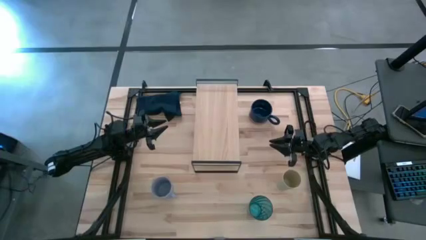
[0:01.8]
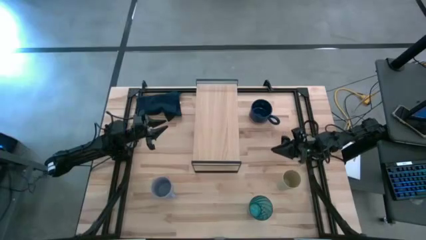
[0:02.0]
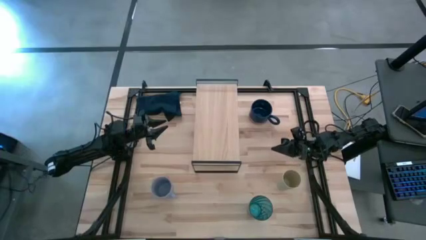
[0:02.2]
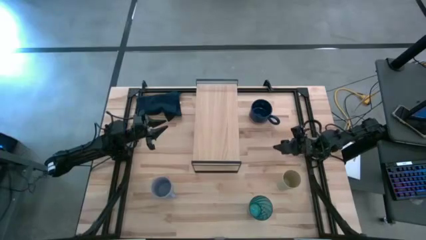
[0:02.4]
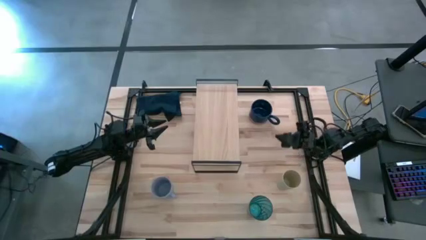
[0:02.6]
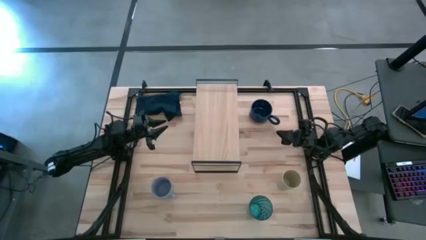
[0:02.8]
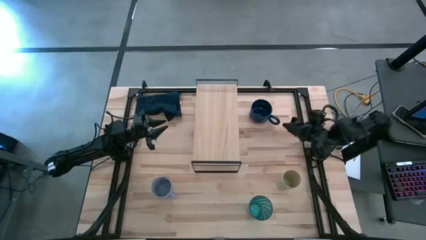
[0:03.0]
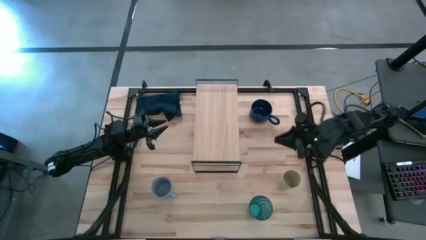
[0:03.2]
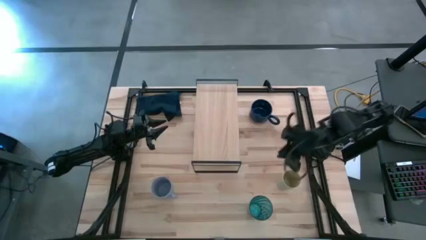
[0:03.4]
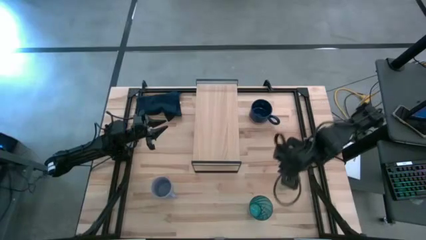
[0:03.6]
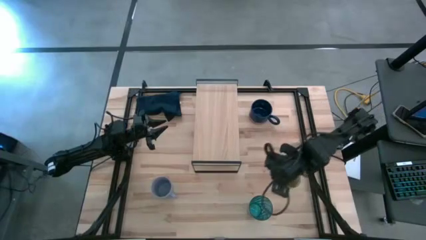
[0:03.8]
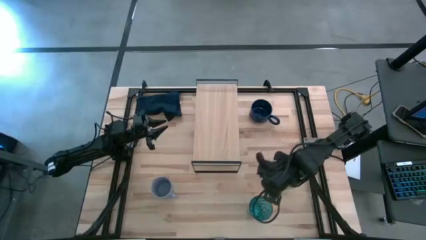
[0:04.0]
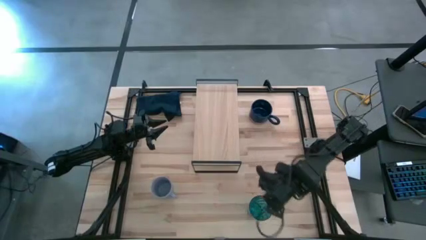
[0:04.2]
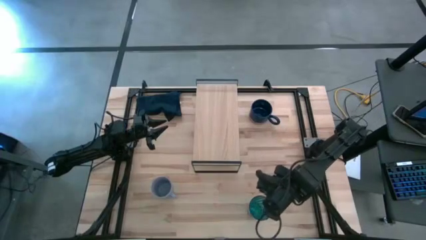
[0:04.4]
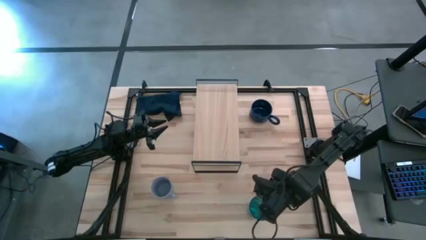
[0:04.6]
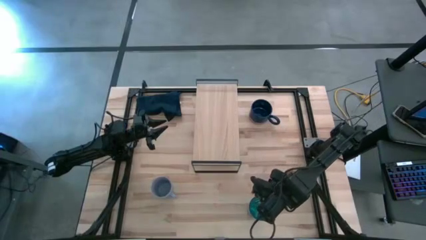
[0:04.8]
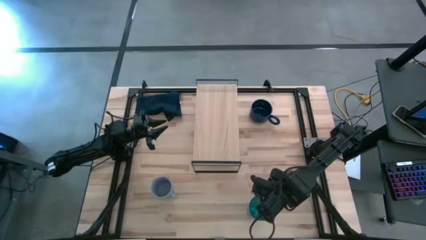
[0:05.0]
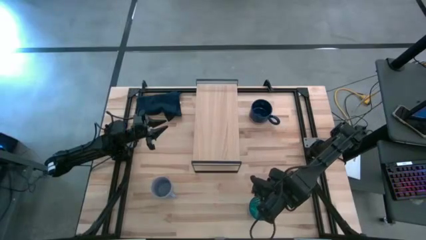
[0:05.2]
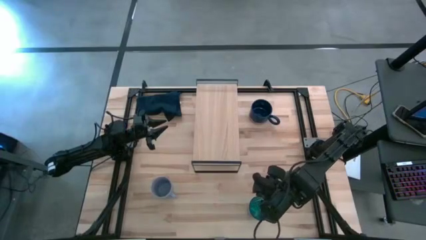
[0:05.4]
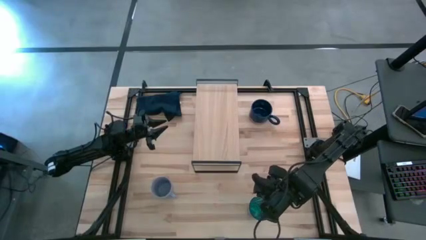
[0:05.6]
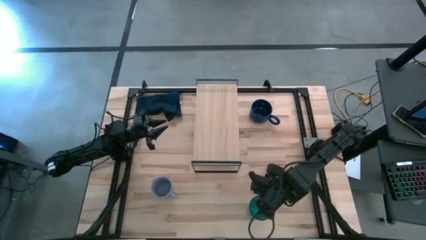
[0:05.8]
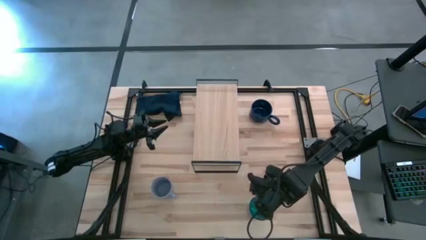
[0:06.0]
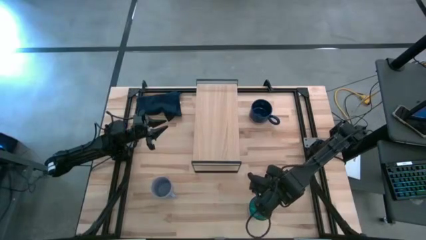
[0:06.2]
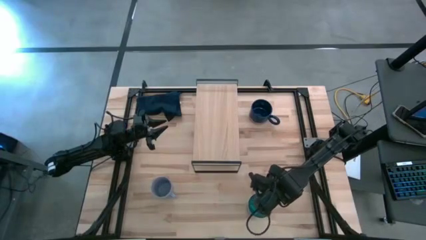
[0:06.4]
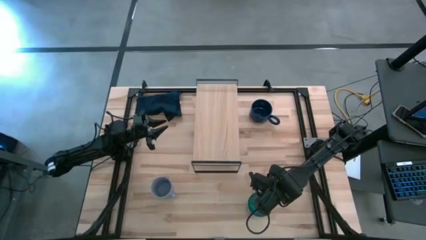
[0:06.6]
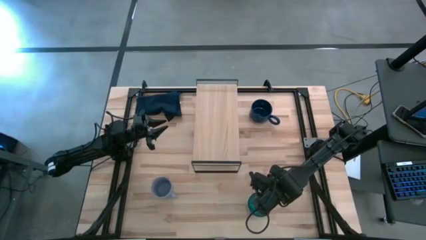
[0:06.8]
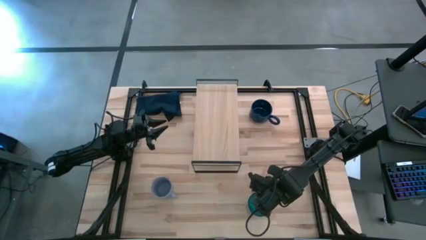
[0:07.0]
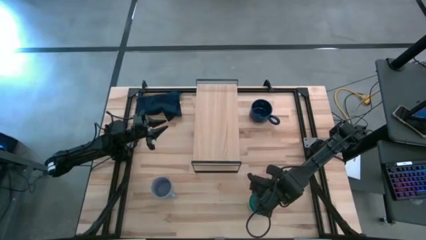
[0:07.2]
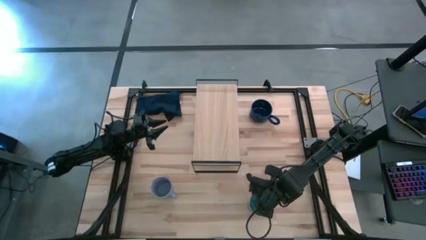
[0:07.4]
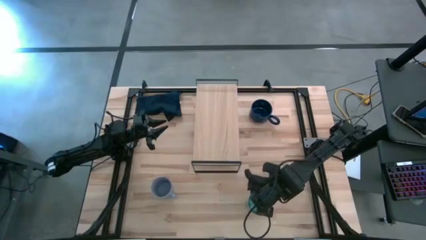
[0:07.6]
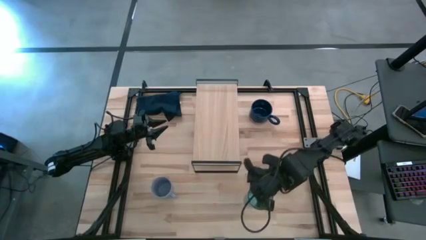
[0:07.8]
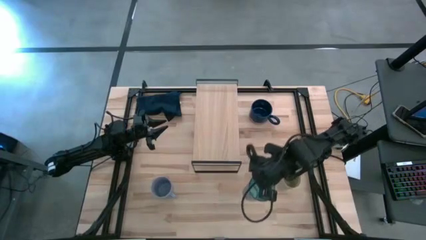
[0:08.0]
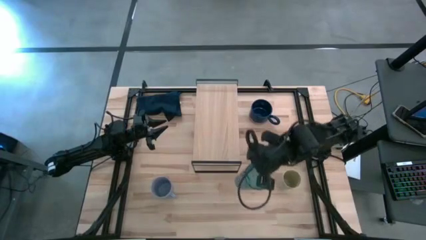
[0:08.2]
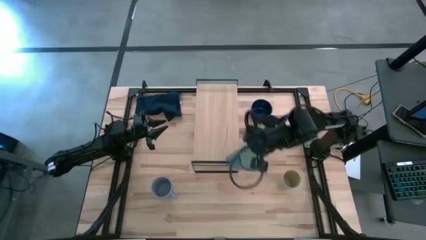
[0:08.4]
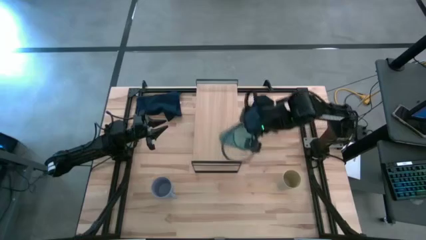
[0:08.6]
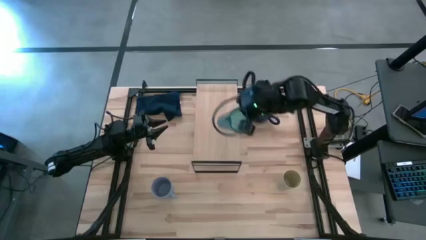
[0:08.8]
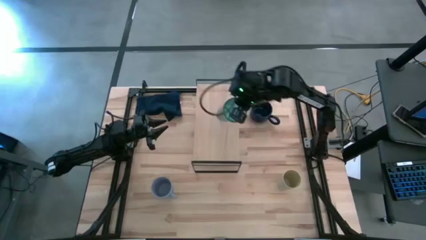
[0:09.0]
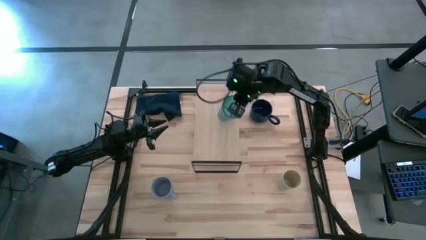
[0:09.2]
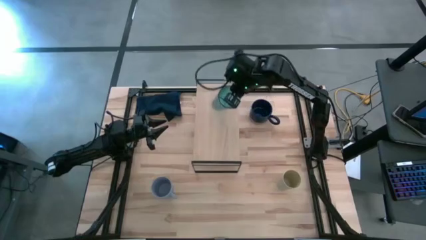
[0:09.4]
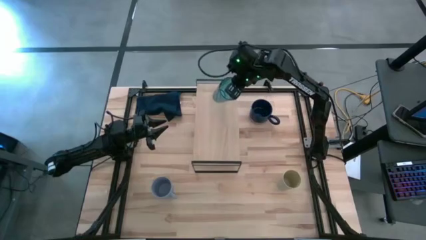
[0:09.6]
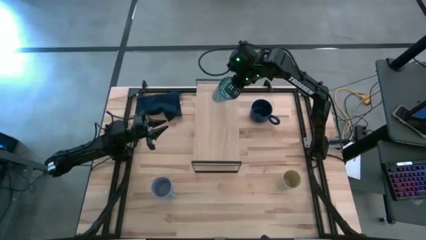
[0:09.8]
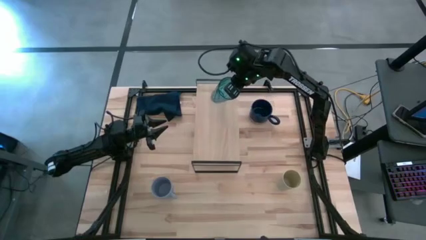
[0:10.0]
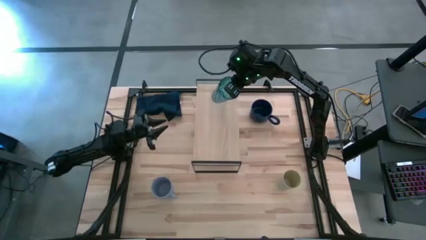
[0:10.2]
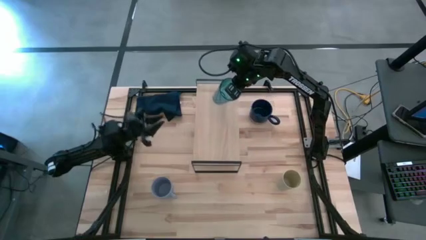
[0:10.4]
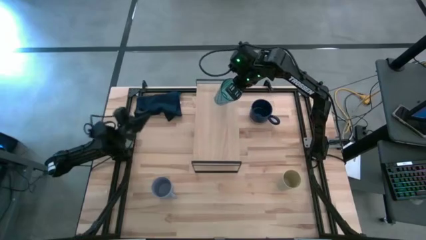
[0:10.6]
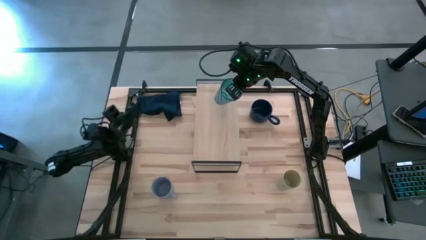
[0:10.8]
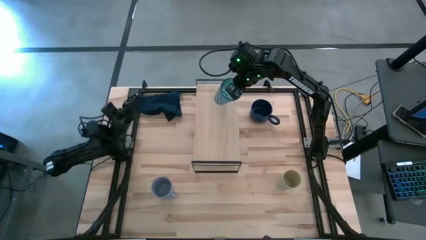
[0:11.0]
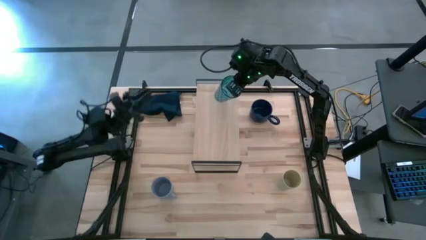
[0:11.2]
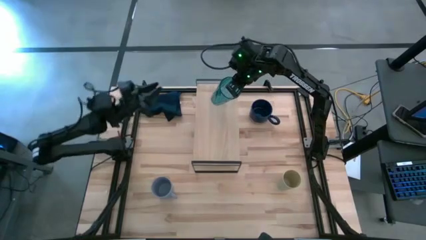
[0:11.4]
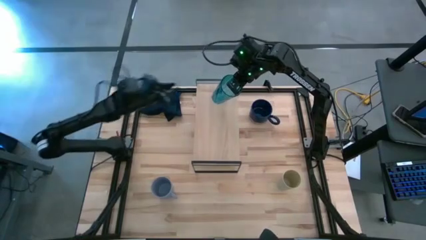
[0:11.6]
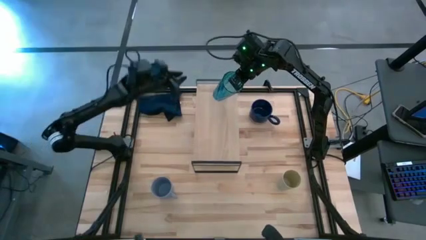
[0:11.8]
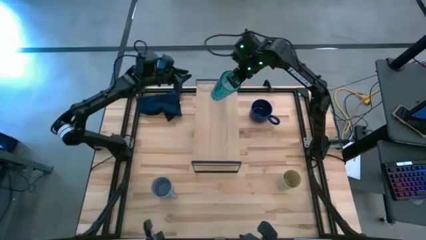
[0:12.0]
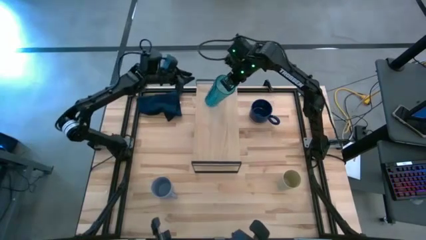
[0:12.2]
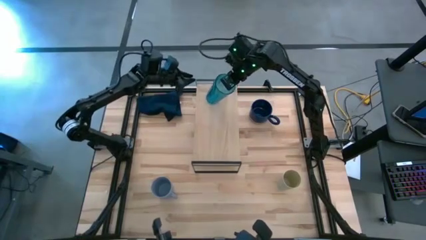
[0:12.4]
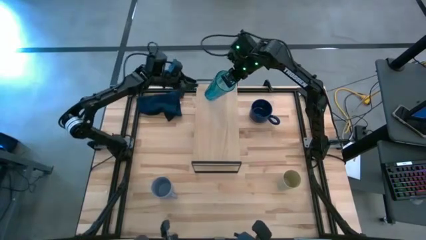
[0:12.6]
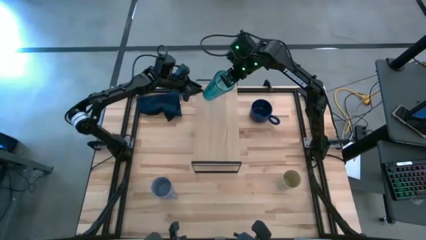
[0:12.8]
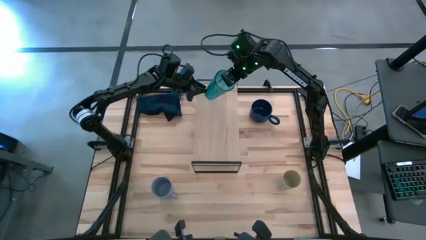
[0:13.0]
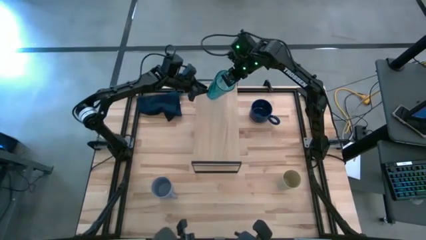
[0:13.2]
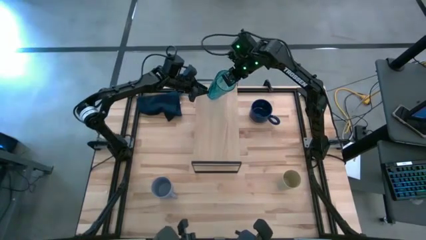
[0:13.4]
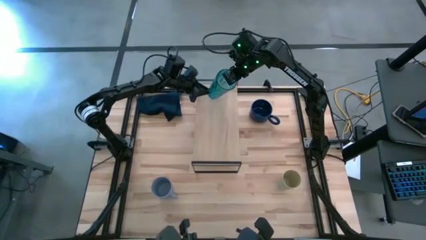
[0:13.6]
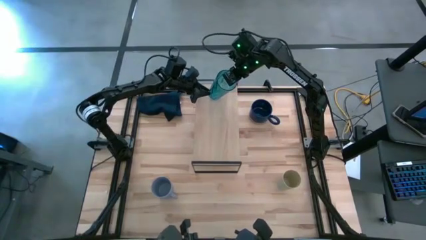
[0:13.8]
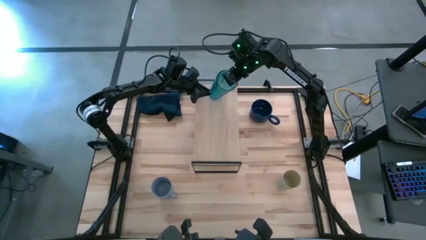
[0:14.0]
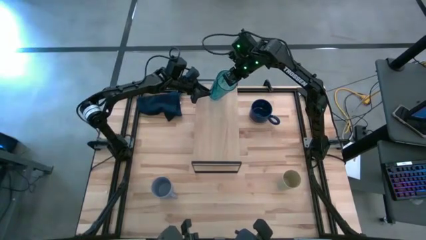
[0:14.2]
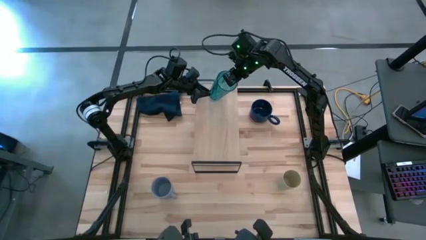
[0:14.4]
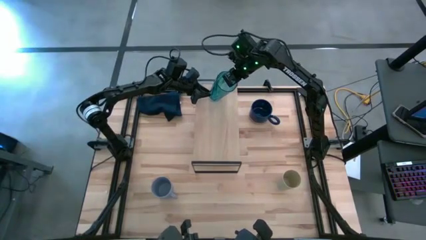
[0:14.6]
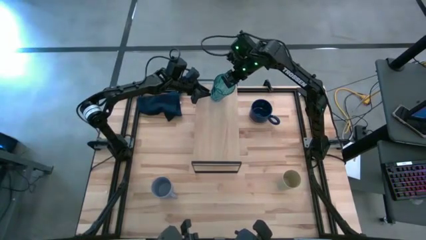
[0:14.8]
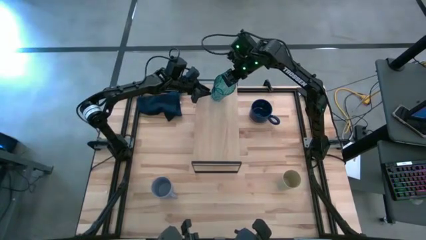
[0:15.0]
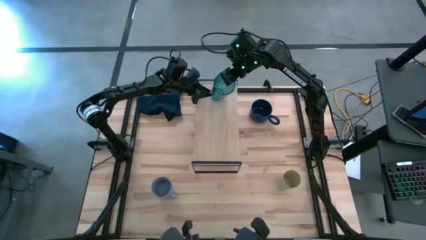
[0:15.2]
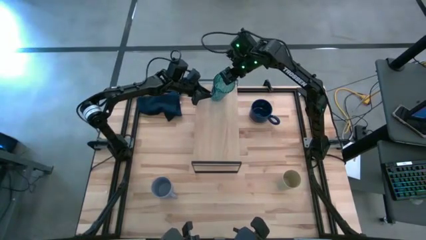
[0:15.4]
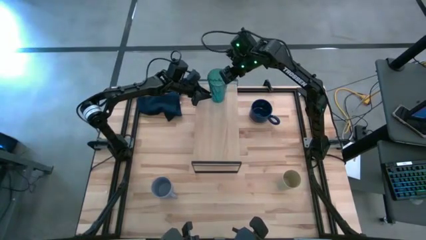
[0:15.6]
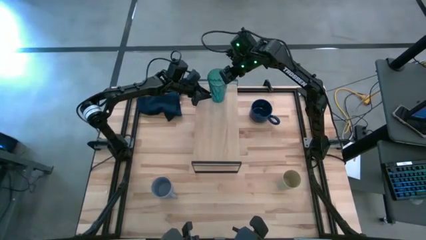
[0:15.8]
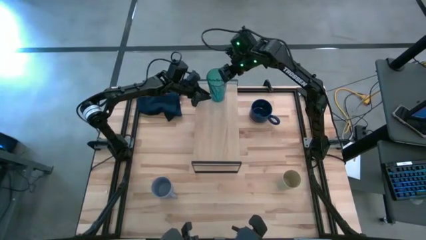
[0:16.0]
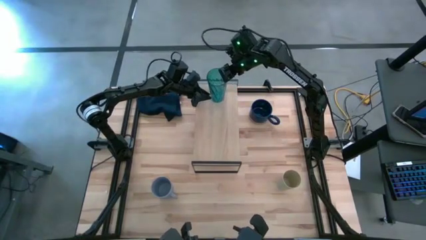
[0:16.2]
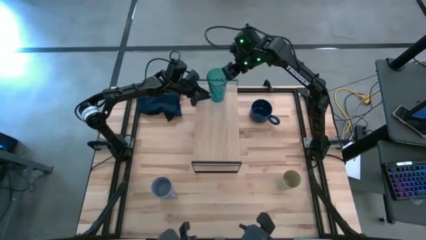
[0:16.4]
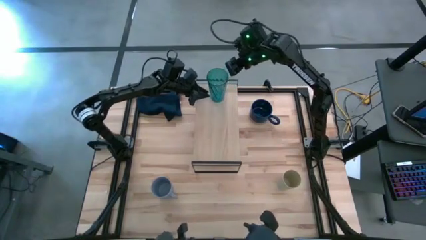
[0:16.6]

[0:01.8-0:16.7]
Task: Stack small to large cups/mugs on shelf
Put the light blue cup on the shelf
